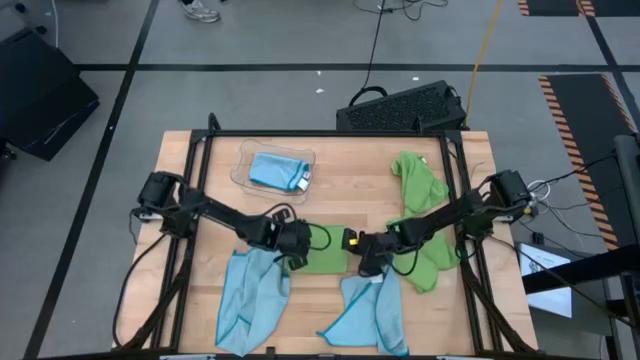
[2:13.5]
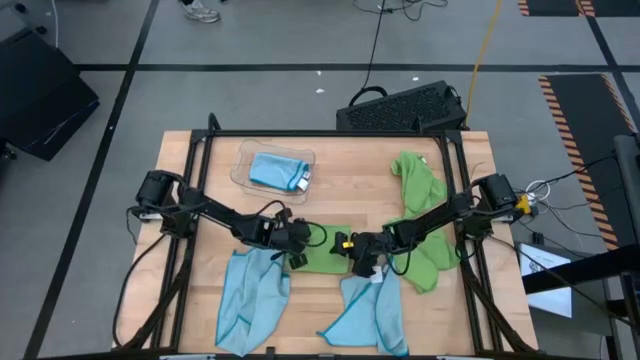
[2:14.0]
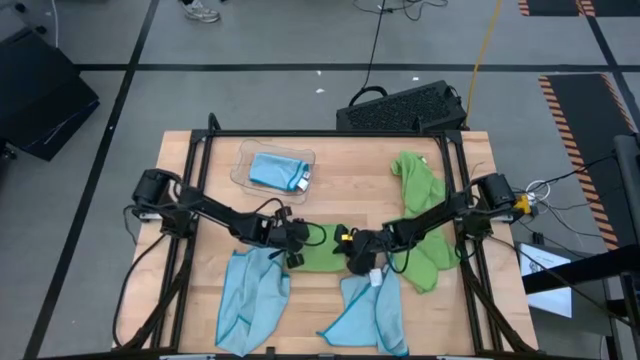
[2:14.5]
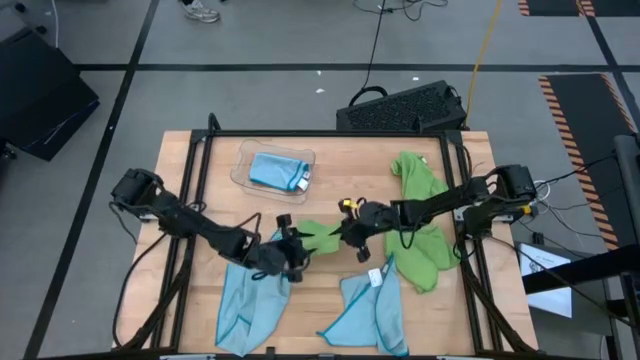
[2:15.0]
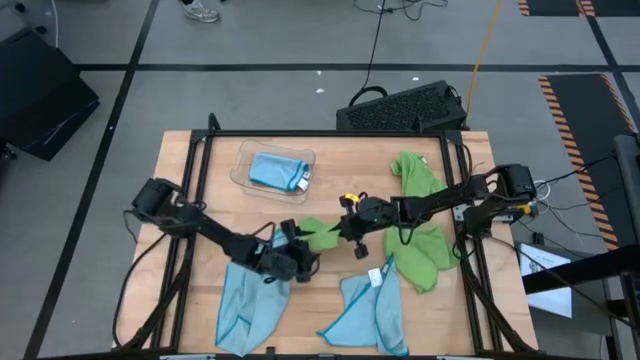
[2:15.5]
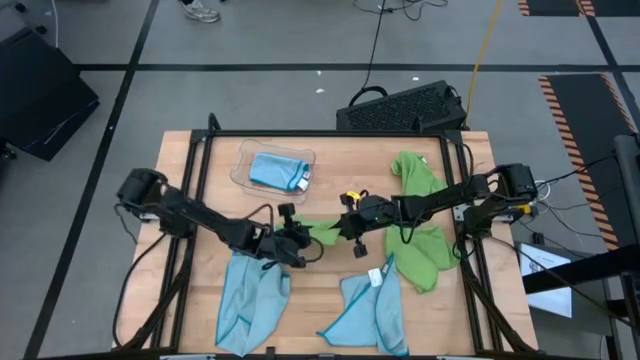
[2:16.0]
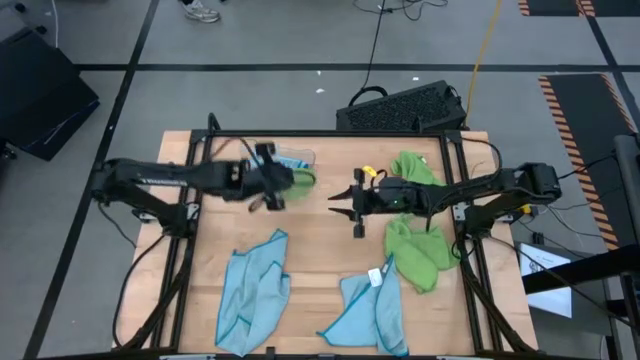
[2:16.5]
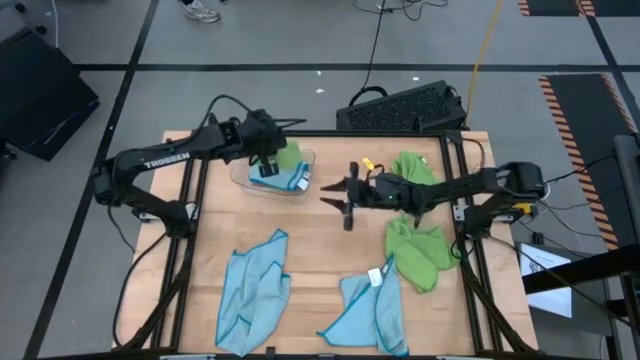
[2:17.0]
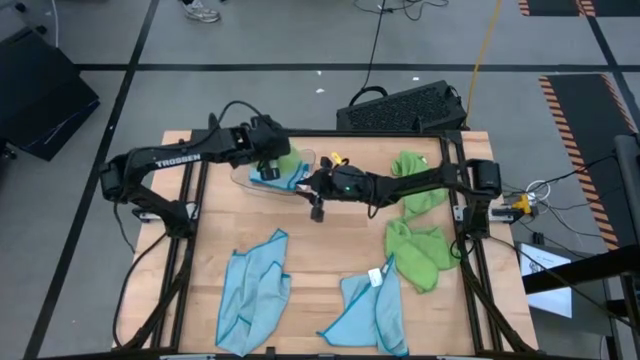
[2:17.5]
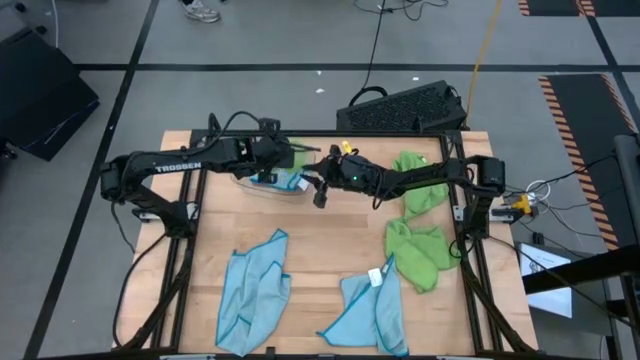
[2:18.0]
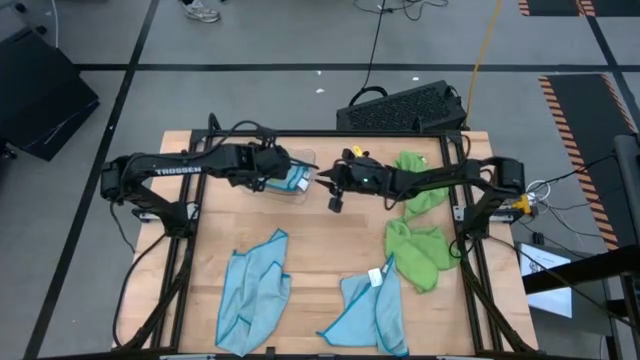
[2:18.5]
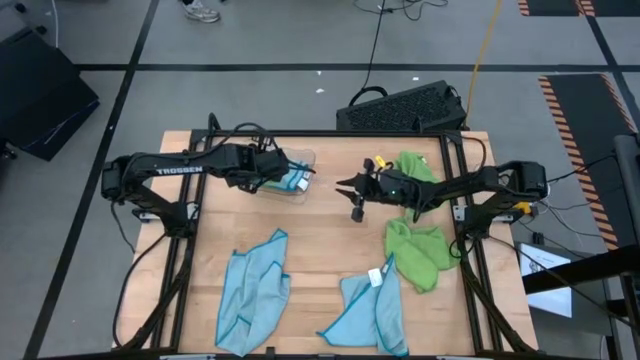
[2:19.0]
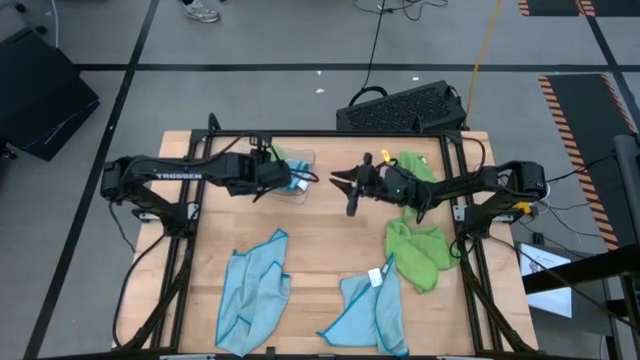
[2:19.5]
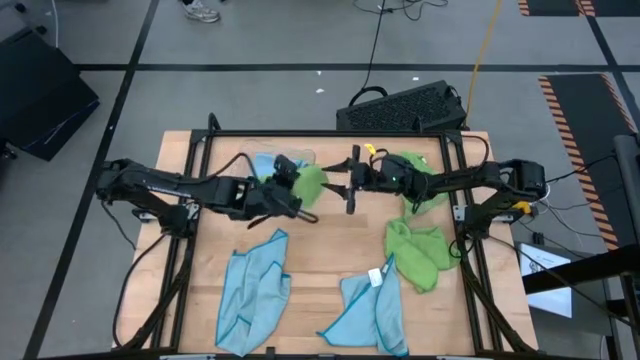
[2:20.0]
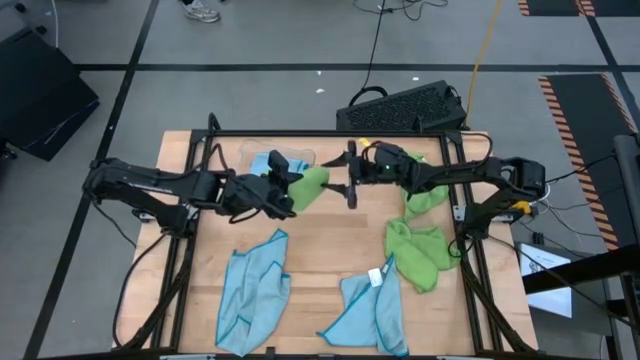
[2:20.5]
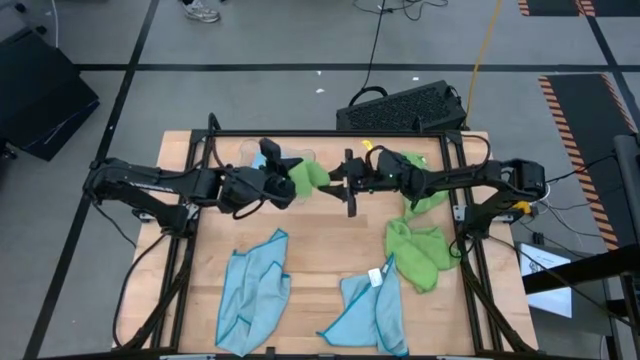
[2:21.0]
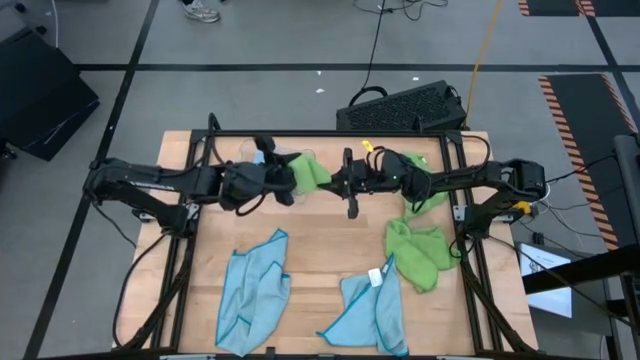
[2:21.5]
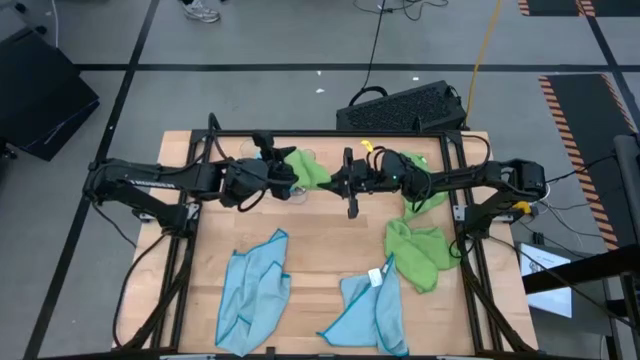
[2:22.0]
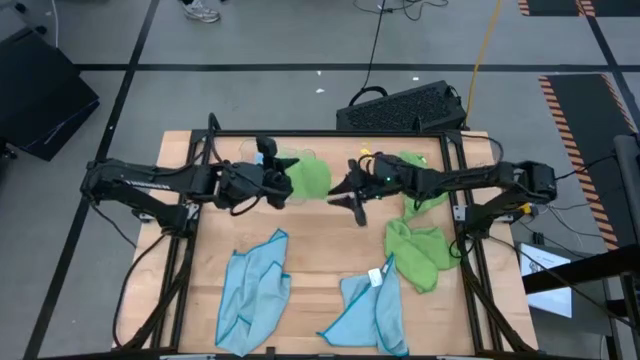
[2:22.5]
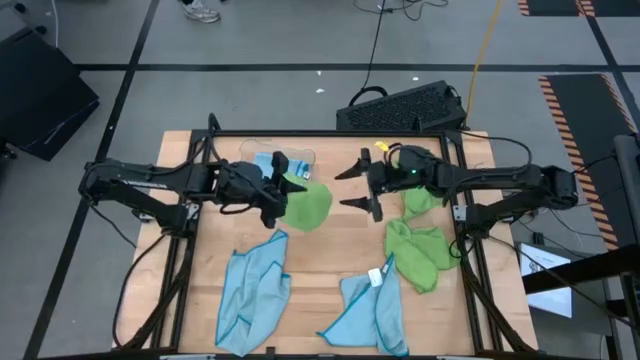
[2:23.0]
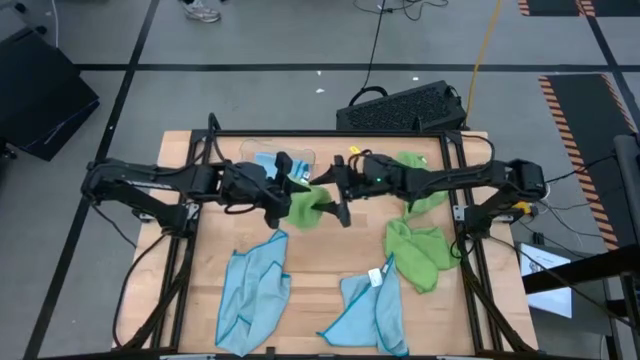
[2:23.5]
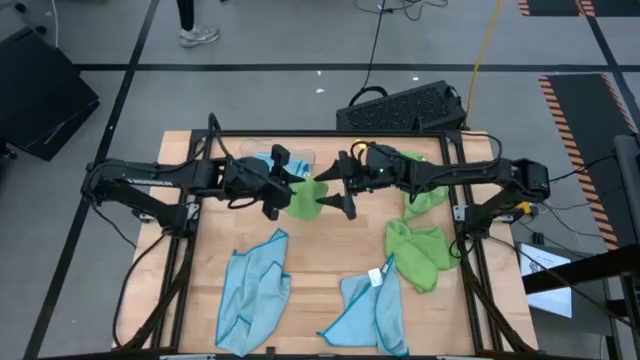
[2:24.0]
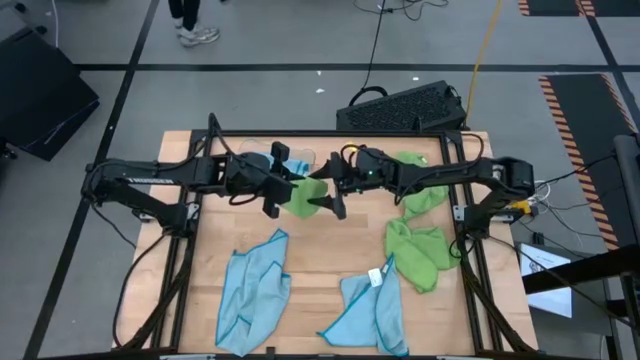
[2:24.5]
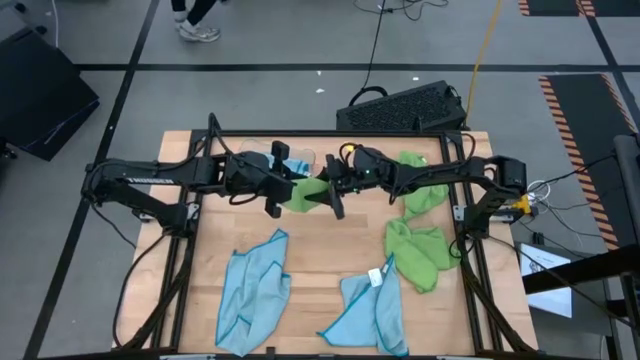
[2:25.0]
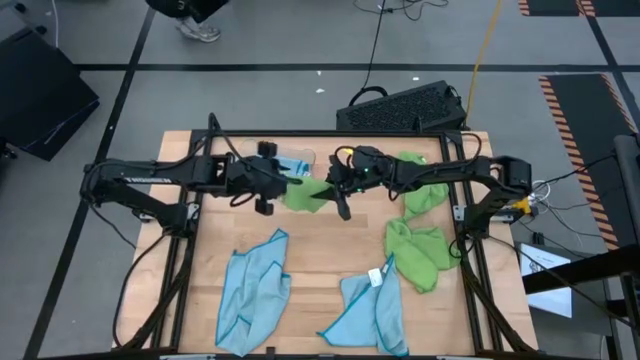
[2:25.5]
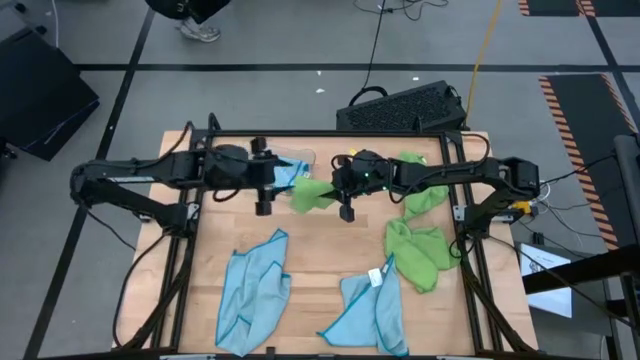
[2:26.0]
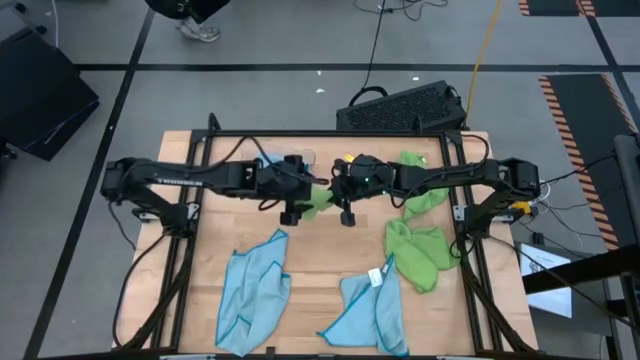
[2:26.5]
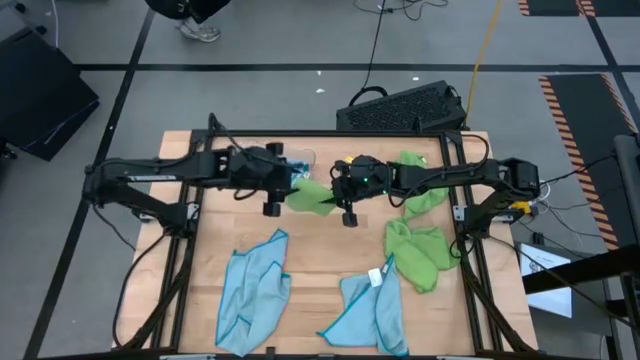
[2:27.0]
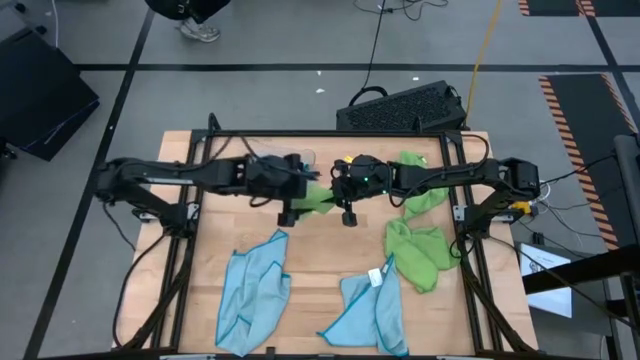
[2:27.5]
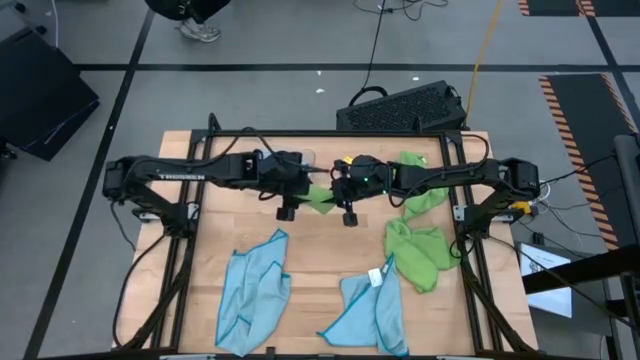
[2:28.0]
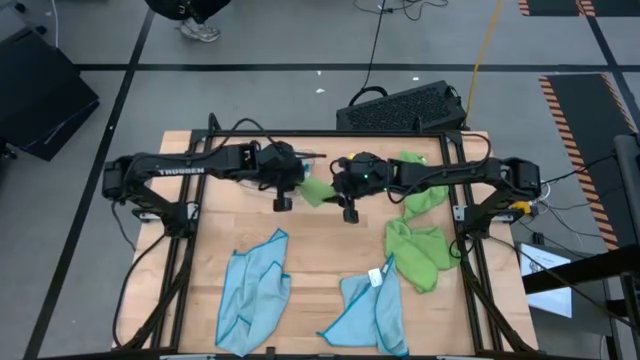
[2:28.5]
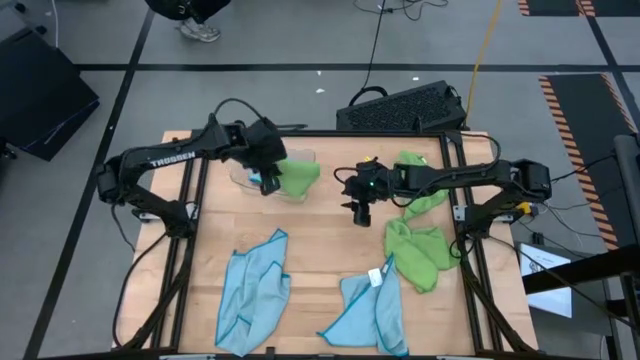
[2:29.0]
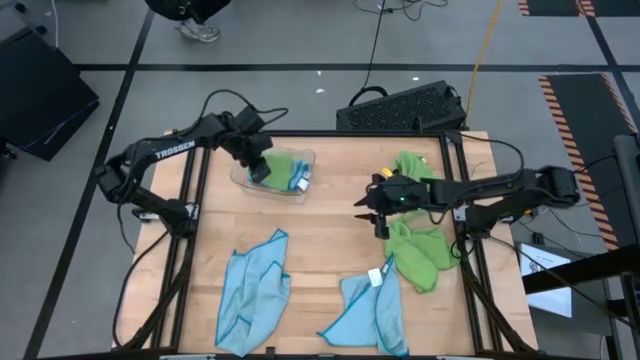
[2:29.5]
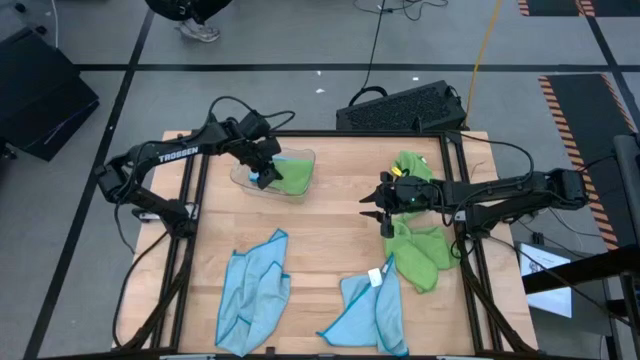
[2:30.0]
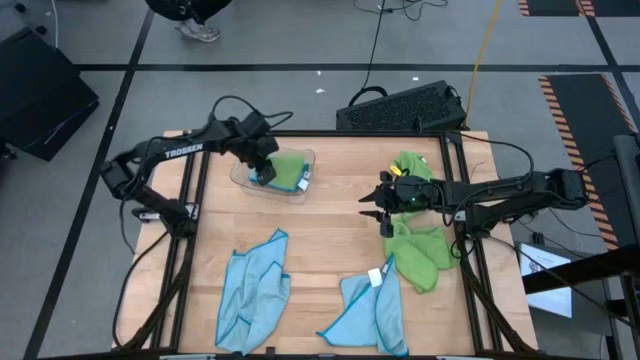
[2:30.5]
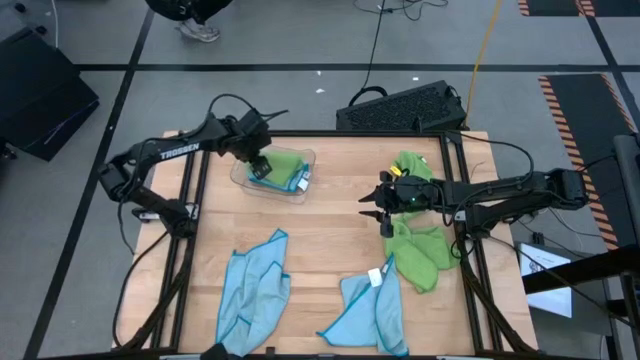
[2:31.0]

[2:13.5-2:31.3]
Task: Fold microfiber towels
Put the bottom left green microfiber cloth into the bin

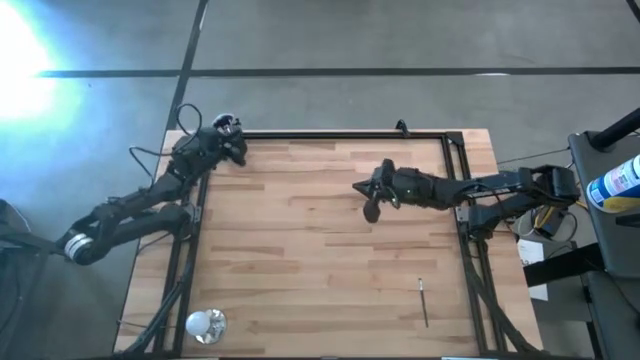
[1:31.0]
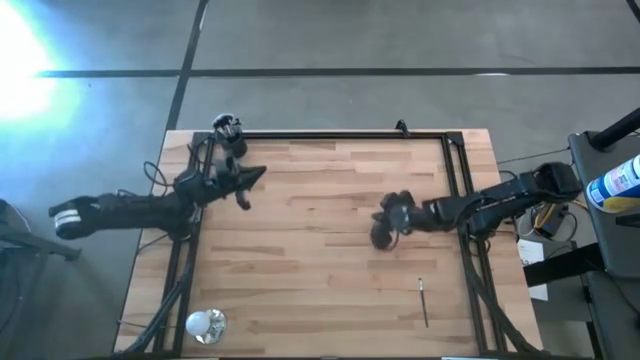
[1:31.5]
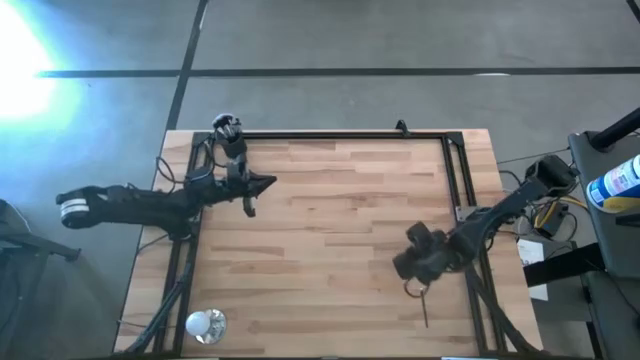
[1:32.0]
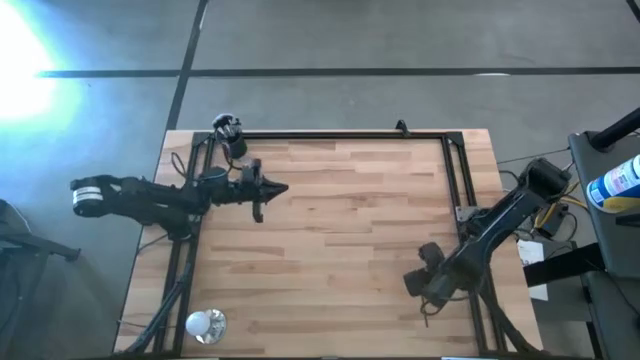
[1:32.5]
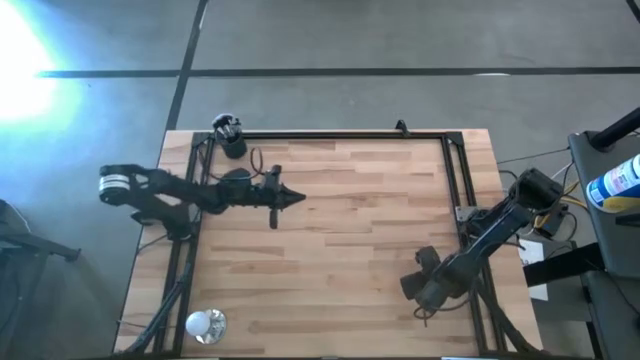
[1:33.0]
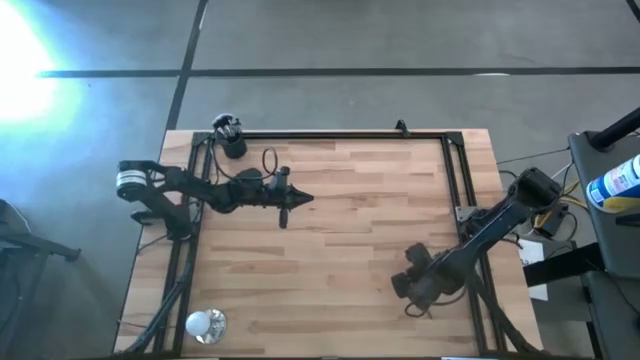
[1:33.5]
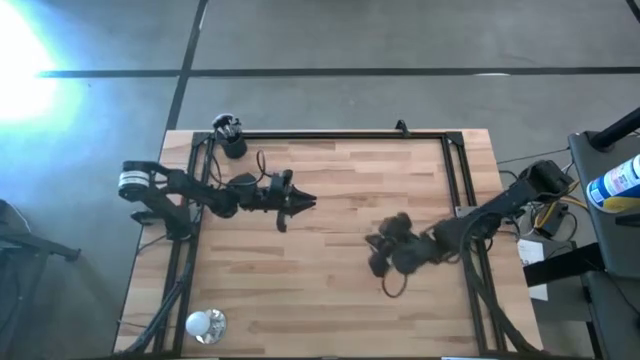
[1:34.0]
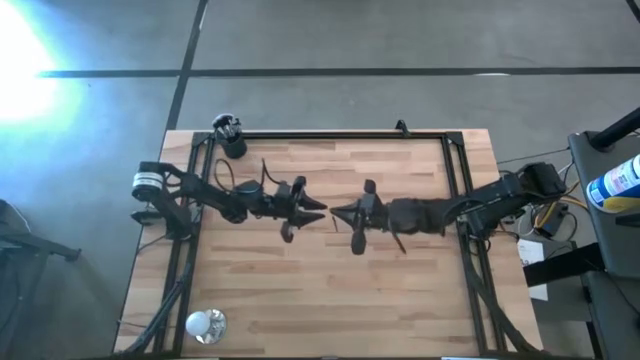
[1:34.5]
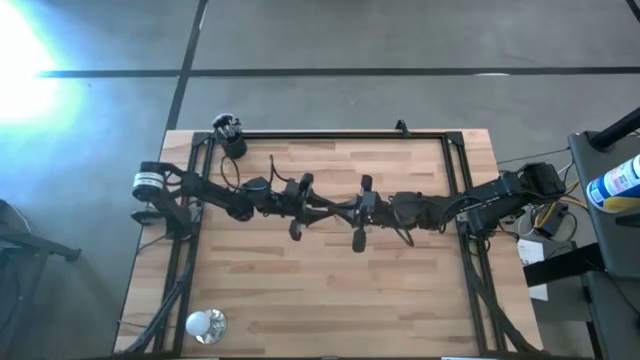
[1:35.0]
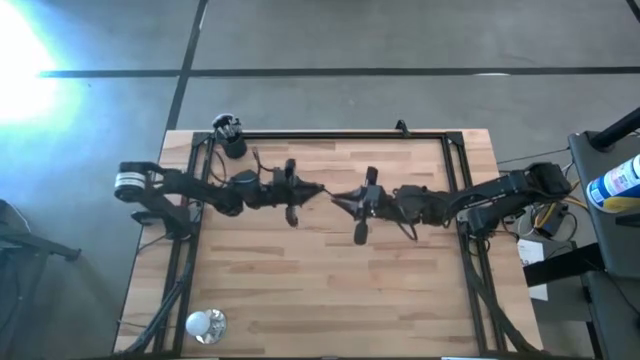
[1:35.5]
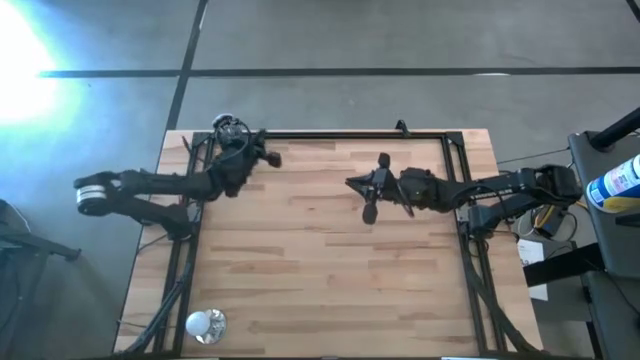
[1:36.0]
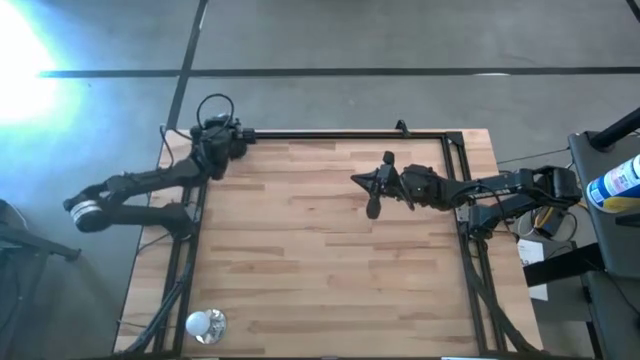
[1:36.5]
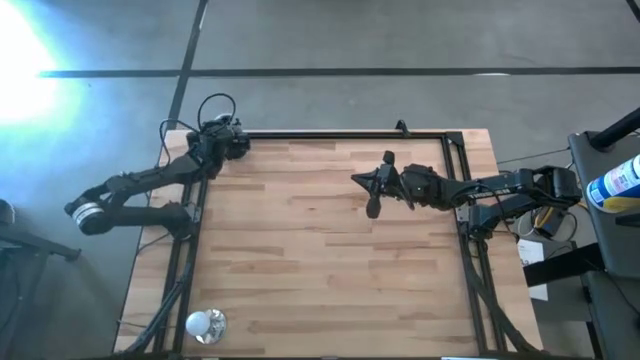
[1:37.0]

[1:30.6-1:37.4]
Task: Put items in baskets/containers
Put the black eyeshadow brush into the black pen holder
